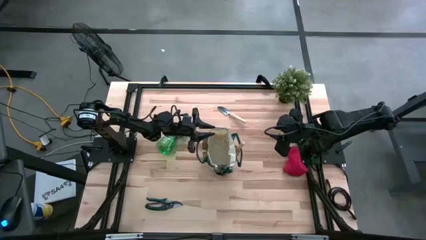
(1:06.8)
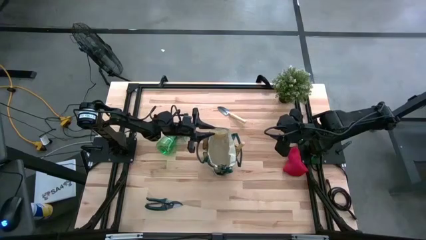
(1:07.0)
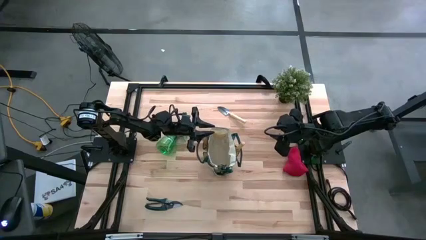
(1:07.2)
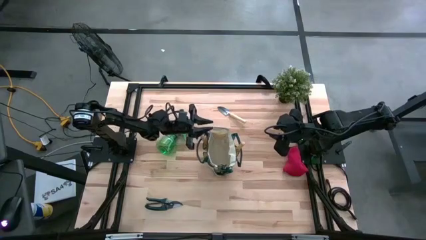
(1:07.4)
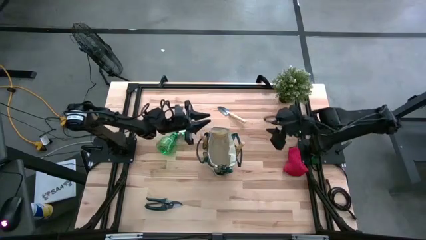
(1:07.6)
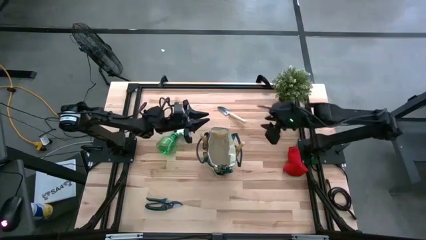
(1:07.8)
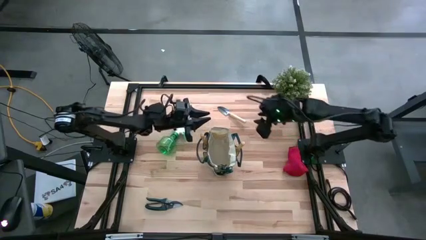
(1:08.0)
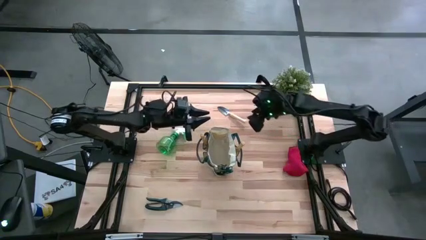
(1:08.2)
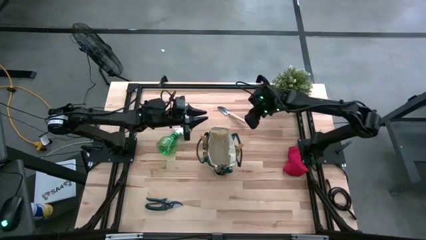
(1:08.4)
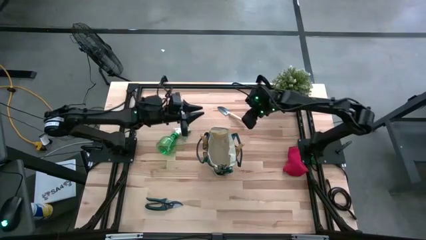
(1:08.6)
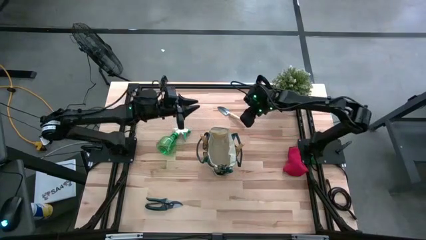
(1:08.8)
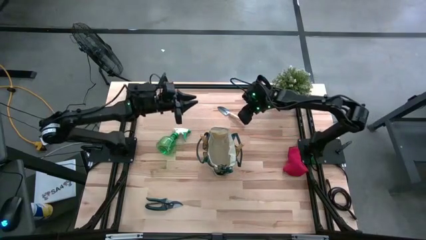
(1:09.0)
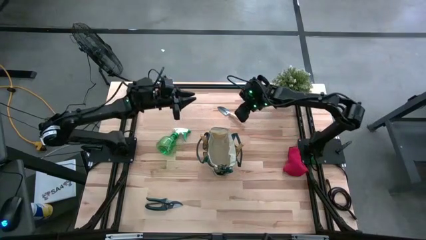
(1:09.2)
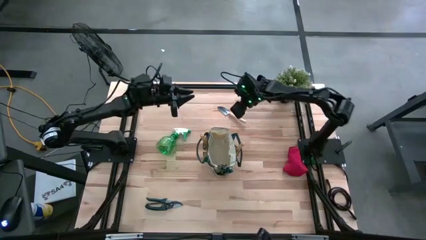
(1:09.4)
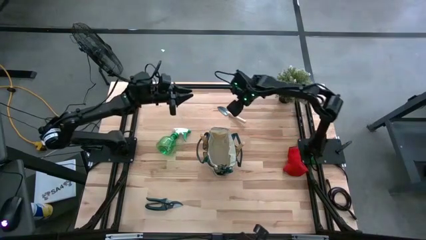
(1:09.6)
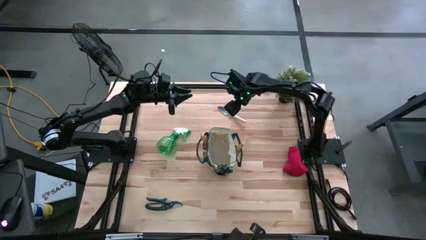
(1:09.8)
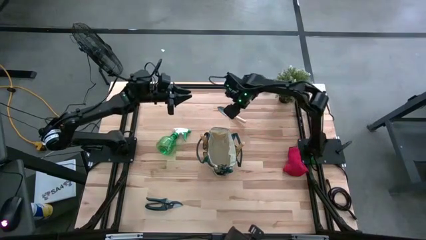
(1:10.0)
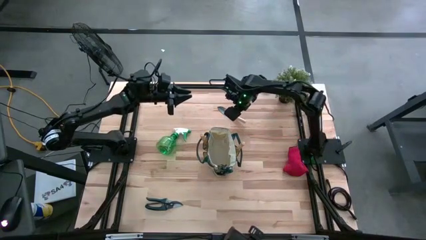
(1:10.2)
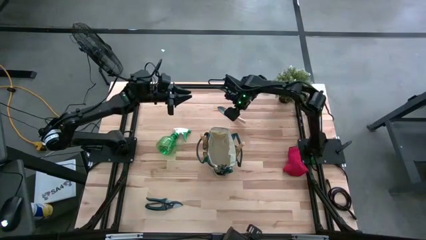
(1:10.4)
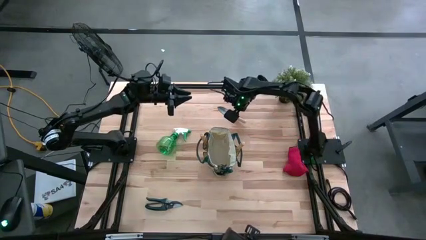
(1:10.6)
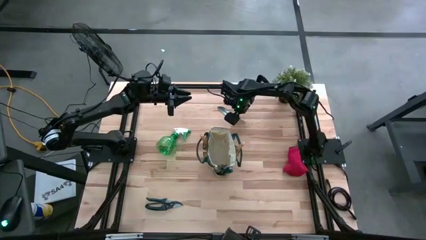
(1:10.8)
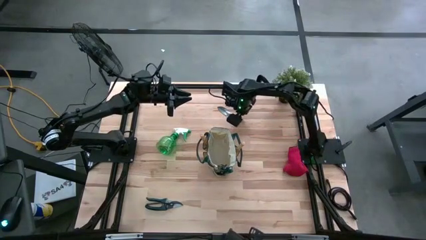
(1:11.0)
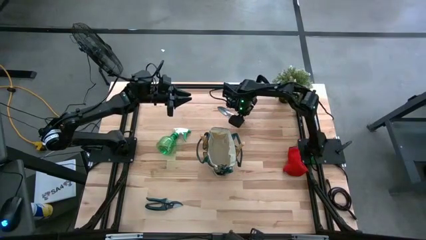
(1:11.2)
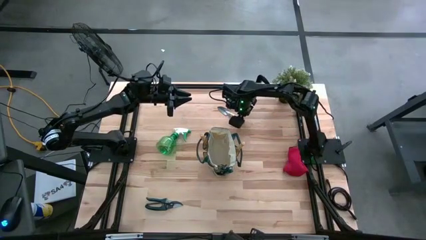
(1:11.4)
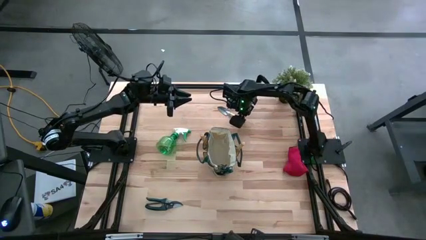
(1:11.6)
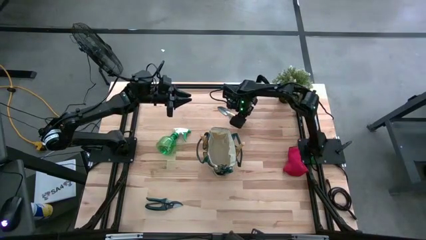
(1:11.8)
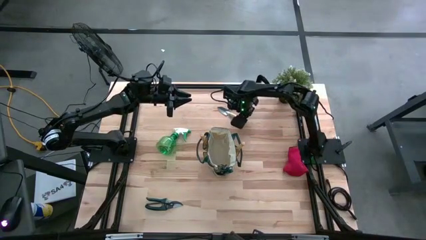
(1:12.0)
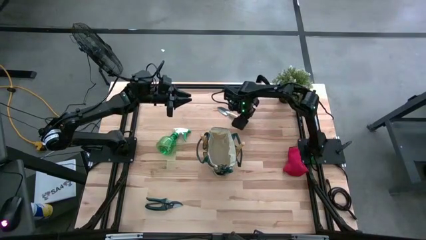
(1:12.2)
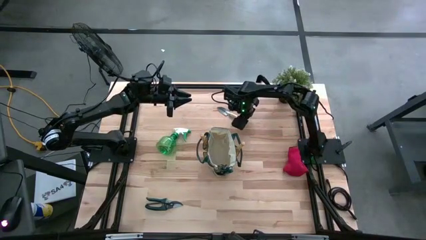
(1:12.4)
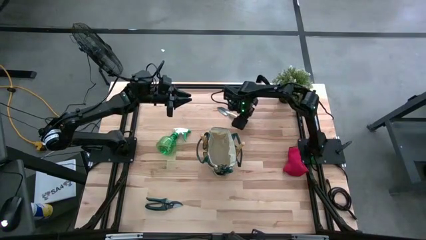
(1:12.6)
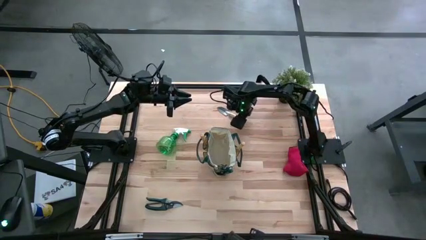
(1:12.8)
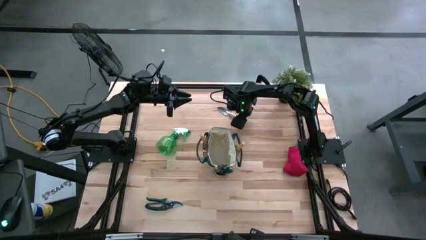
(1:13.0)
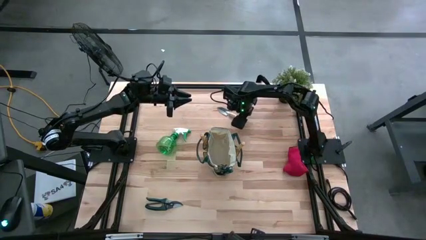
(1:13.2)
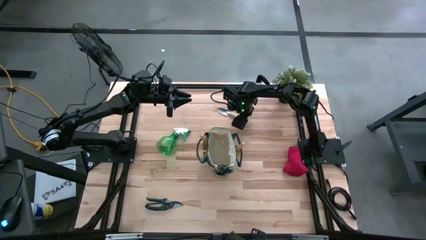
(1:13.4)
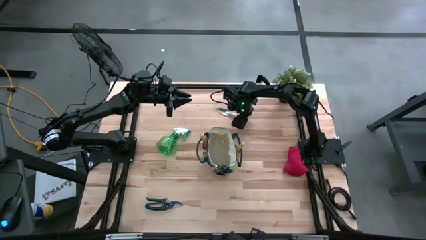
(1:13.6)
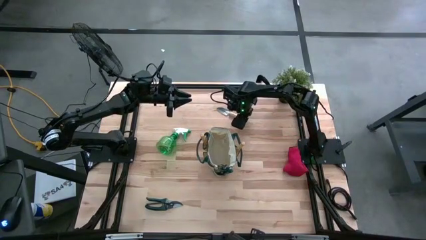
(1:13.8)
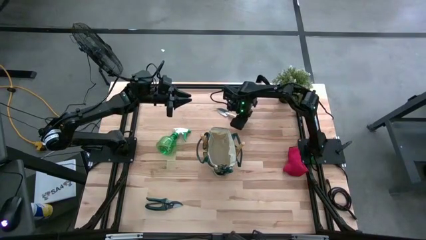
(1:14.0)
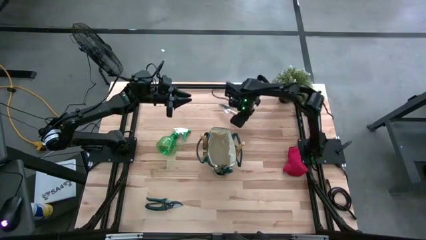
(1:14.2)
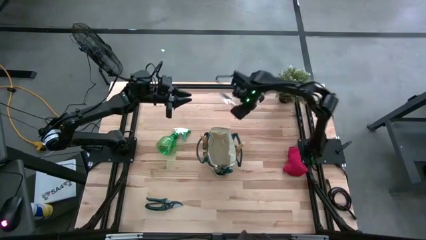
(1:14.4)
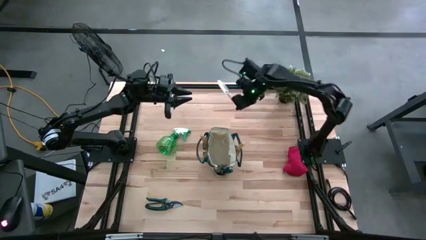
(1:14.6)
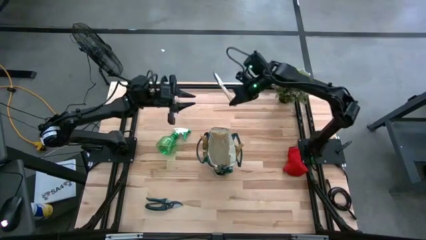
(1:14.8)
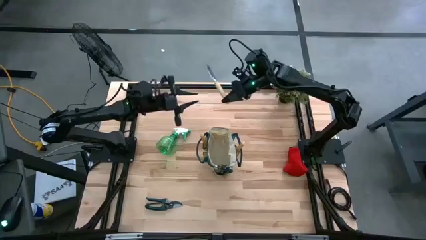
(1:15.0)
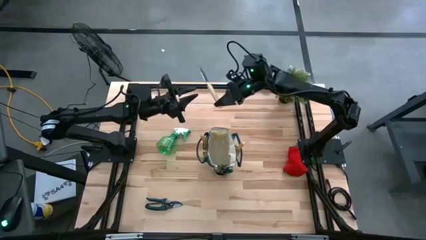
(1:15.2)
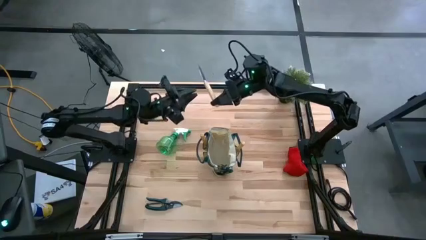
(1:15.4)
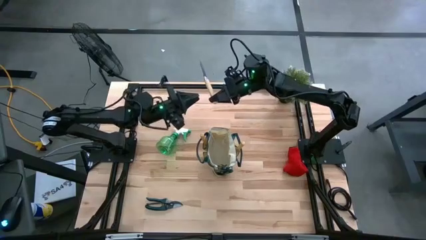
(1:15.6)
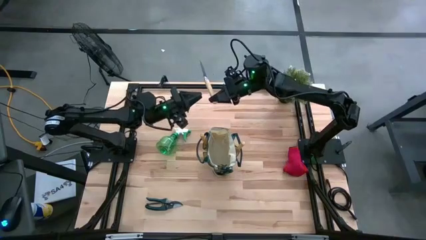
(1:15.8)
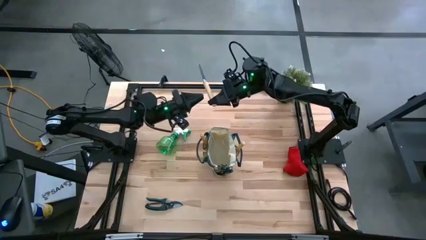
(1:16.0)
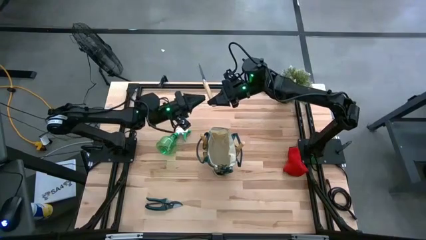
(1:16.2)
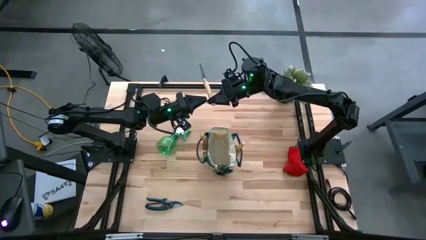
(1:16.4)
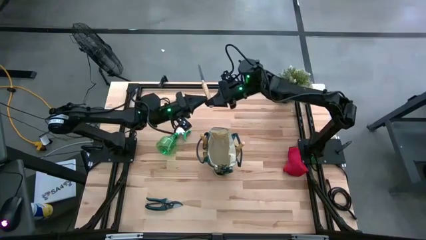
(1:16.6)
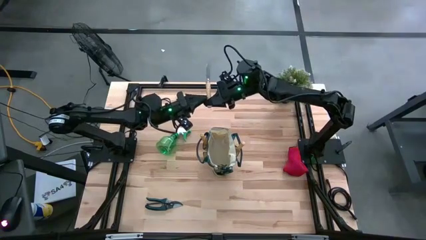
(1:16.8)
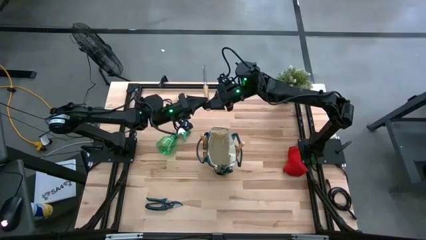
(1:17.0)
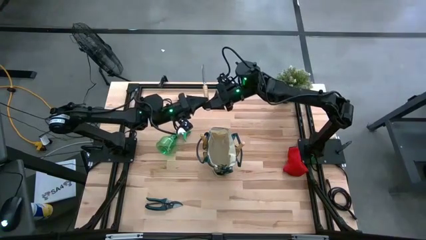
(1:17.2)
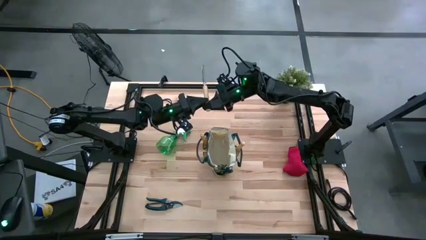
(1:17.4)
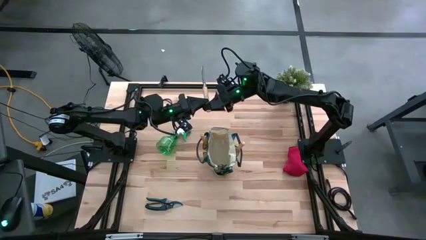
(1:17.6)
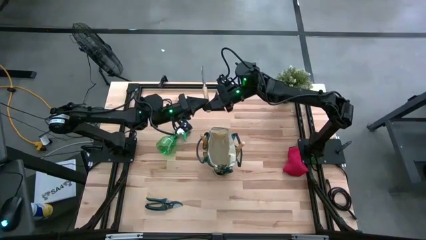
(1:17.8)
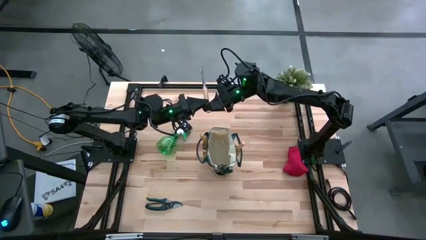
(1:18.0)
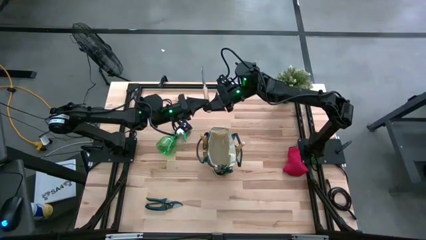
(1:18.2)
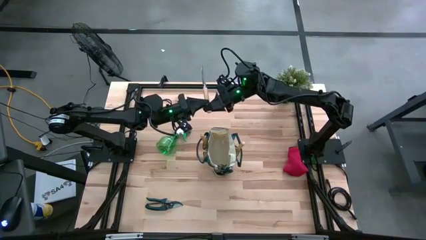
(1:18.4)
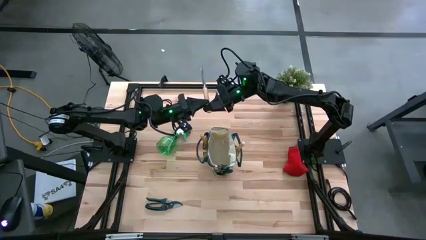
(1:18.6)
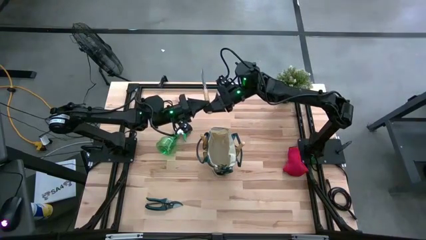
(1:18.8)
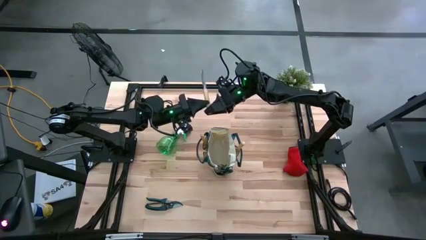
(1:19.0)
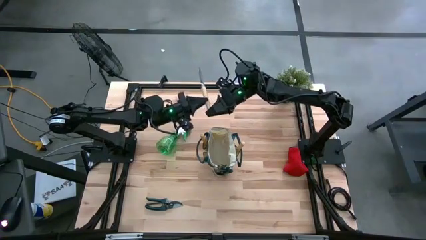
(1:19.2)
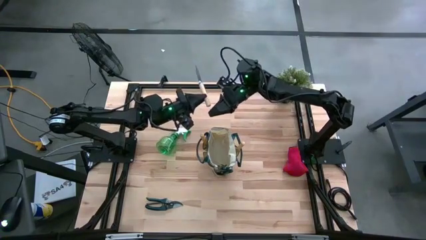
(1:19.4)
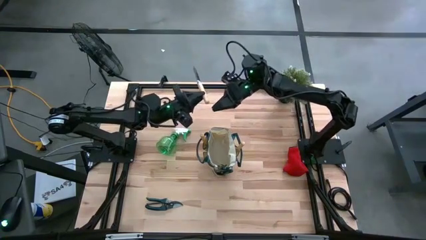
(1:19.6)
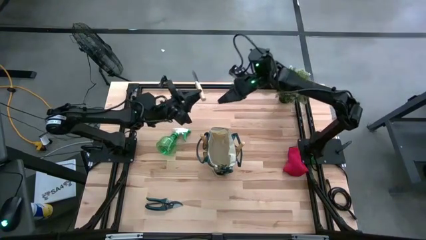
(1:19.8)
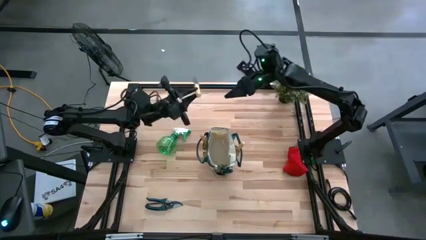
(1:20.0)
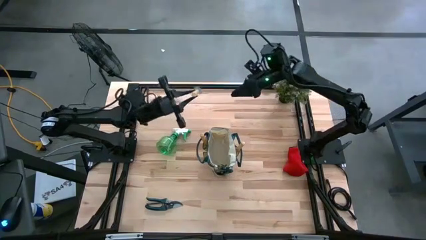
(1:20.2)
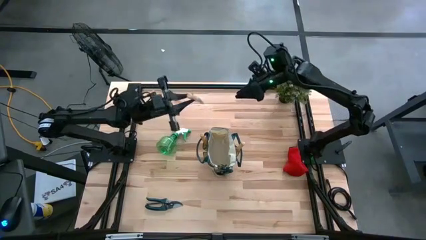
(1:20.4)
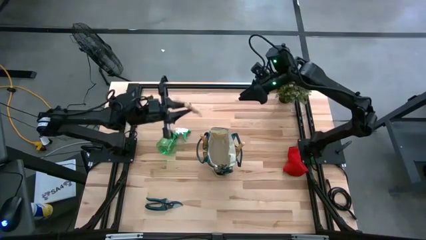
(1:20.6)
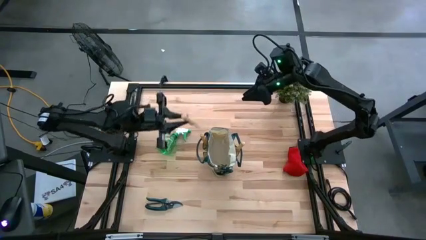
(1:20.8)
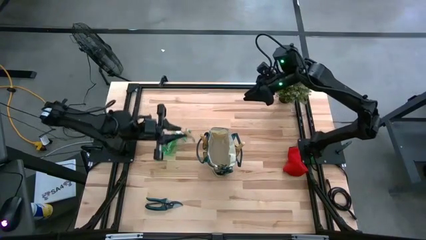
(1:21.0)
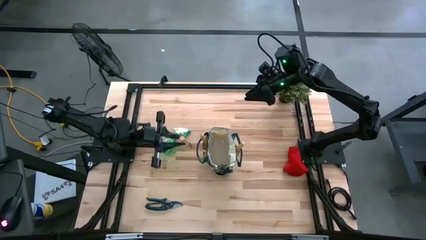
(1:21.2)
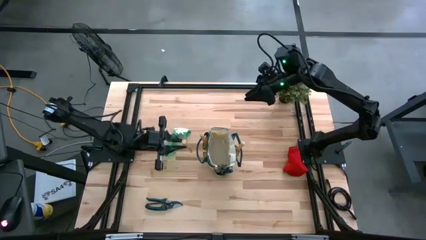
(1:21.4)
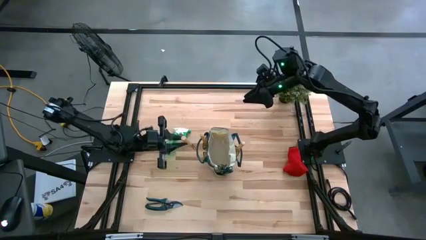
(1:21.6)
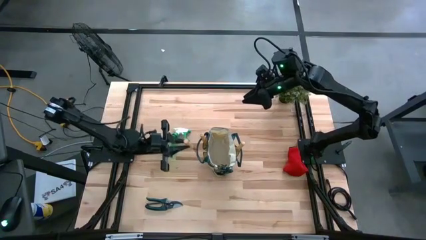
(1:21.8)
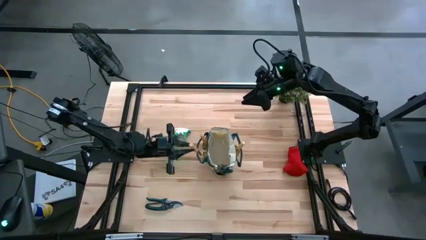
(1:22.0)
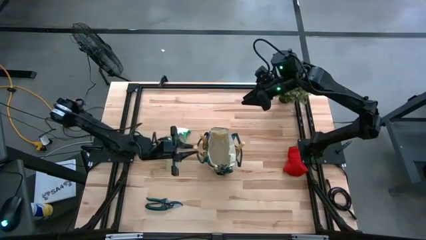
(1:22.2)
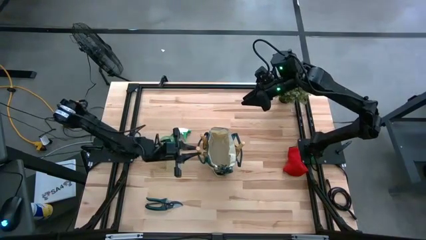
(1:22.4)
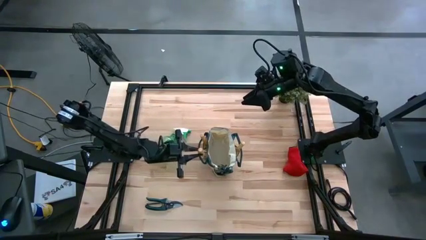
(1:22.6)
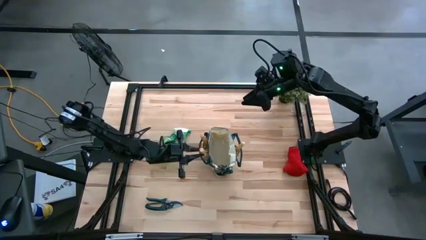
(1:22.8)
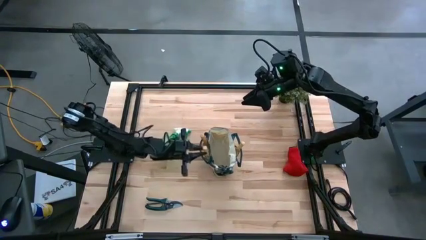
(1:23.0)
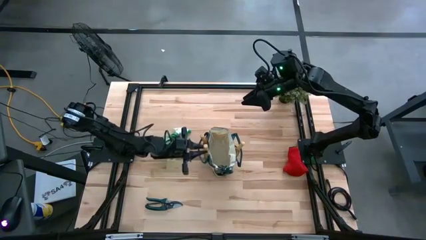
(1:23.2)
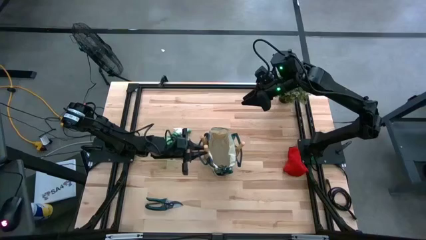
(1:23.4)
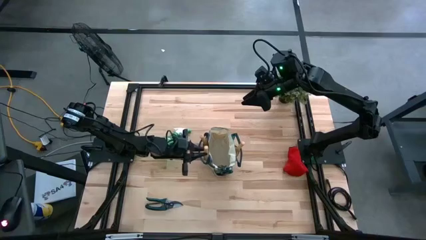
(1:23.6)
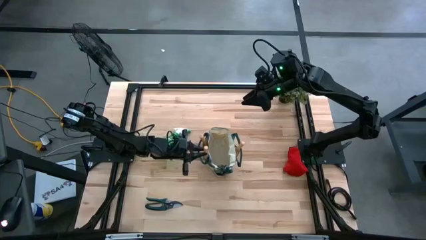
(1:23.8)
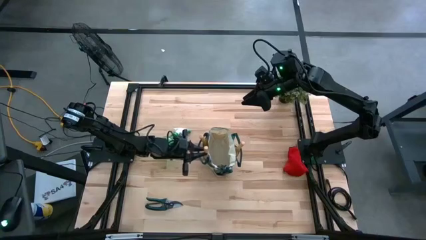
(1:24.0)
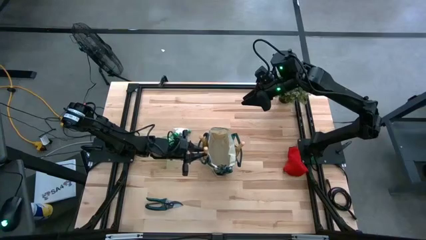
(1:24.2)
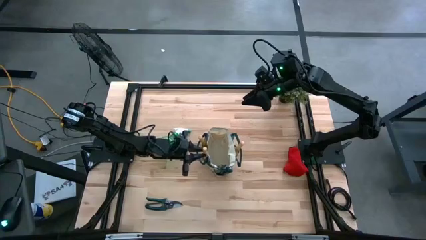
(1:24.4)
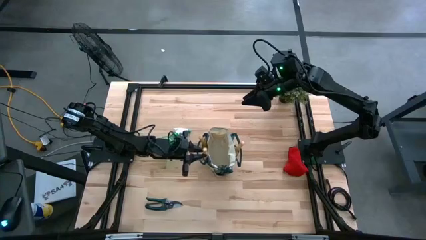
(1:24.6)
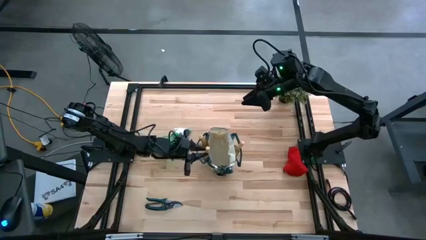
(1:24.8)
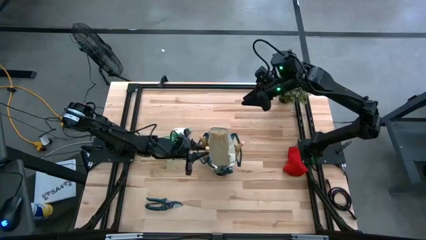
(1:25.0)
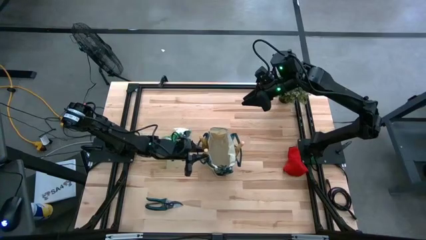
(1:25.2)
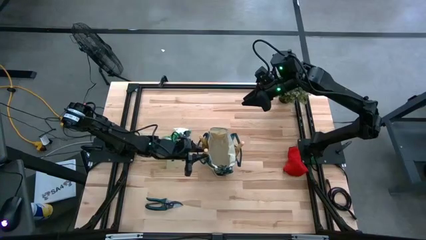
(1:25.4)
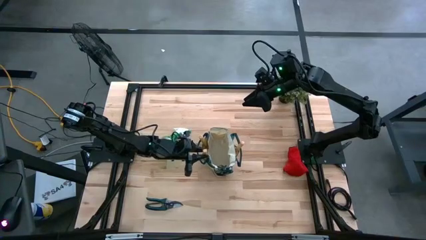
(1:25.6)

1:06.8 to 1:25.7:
Task: Pick & Place Garden tools in Gardening bag
Put the brown trowel into the white gardening bag
